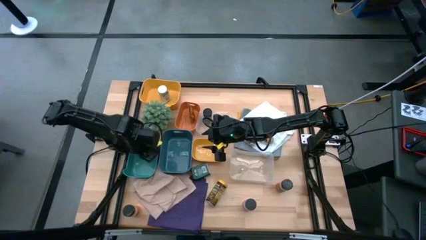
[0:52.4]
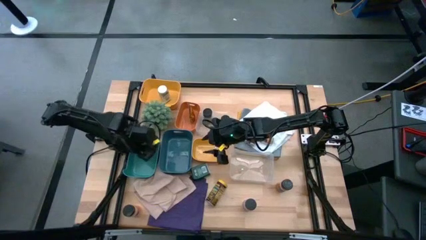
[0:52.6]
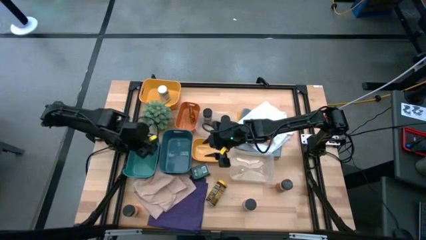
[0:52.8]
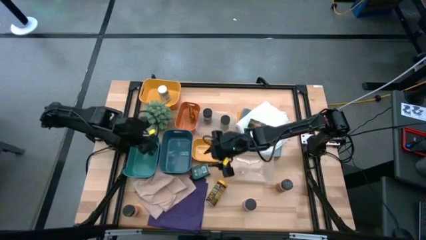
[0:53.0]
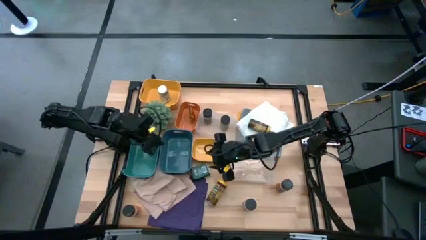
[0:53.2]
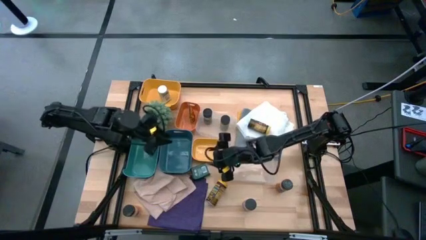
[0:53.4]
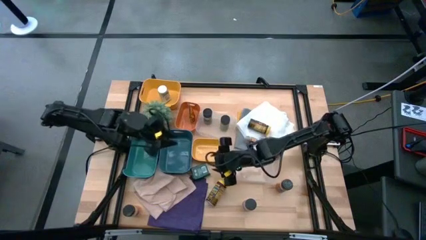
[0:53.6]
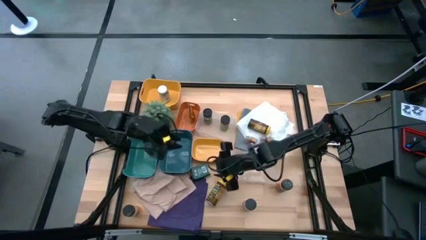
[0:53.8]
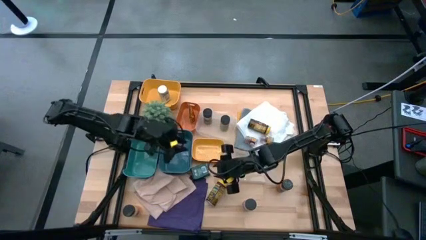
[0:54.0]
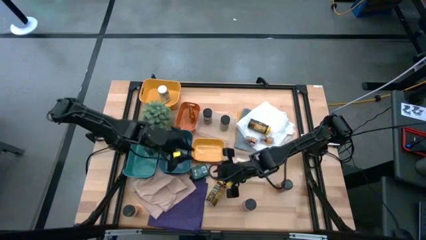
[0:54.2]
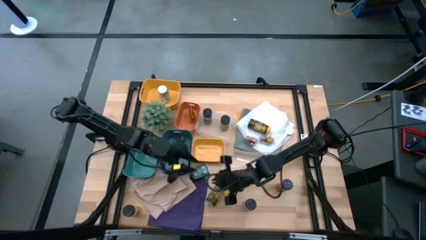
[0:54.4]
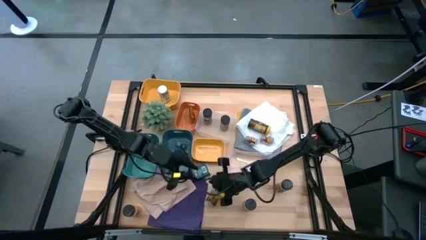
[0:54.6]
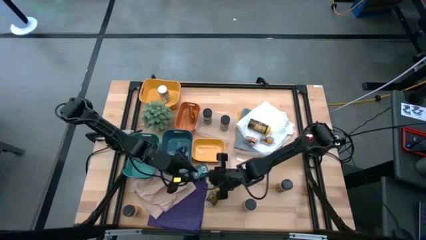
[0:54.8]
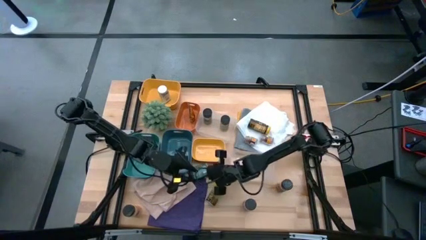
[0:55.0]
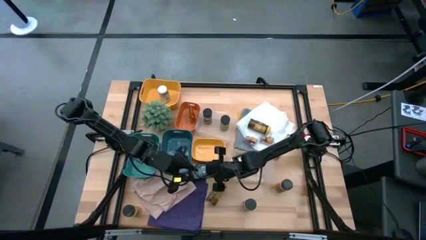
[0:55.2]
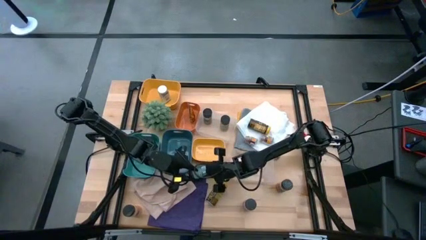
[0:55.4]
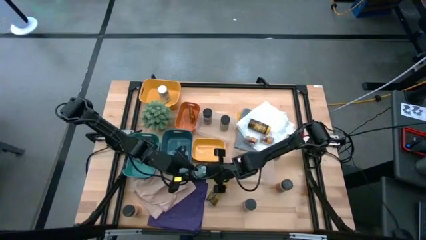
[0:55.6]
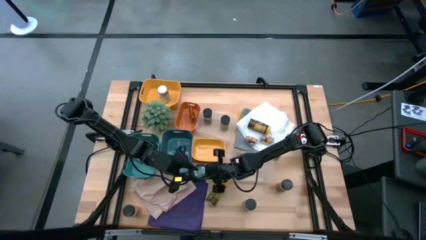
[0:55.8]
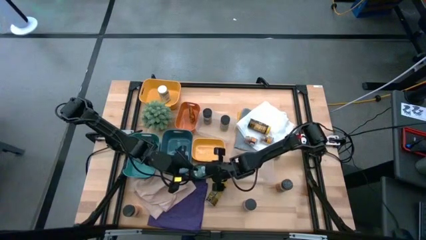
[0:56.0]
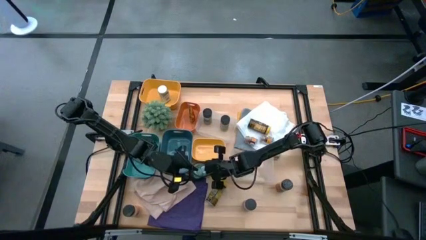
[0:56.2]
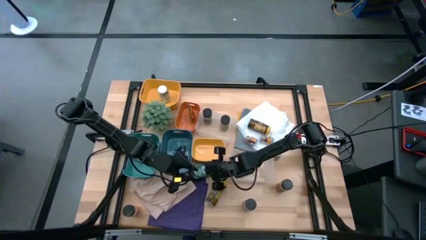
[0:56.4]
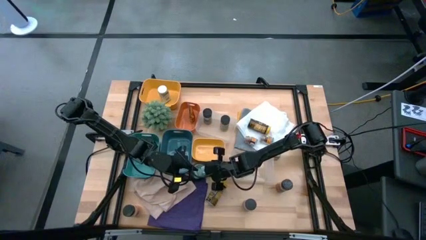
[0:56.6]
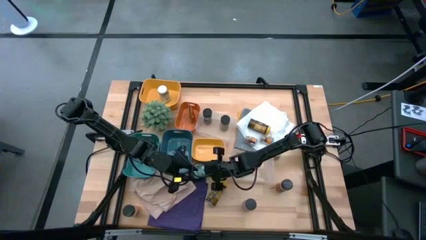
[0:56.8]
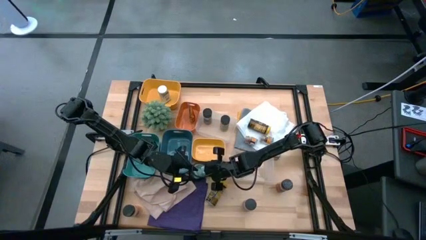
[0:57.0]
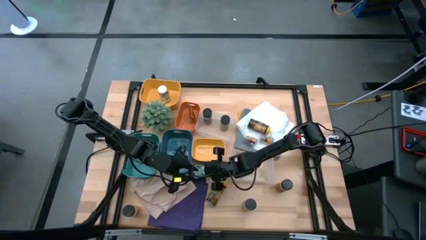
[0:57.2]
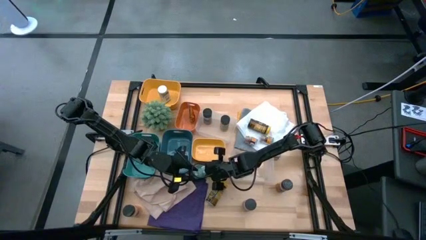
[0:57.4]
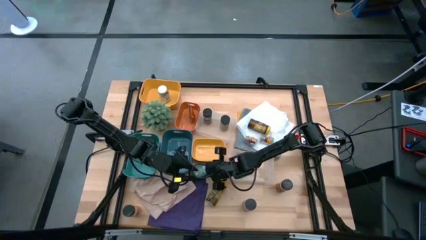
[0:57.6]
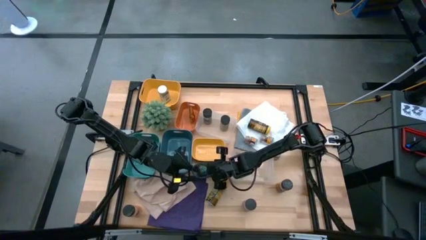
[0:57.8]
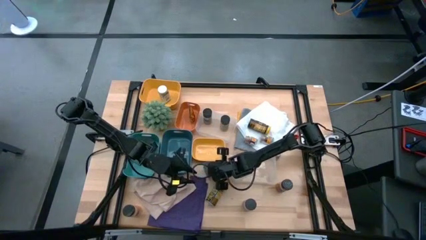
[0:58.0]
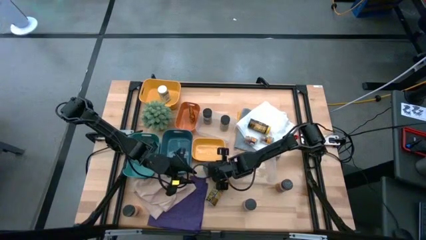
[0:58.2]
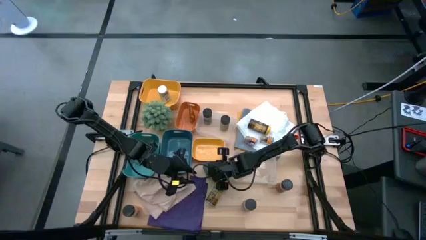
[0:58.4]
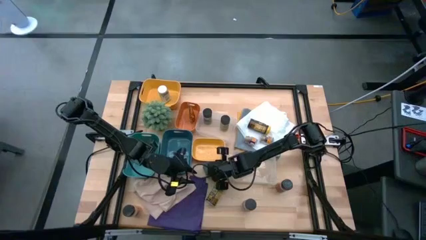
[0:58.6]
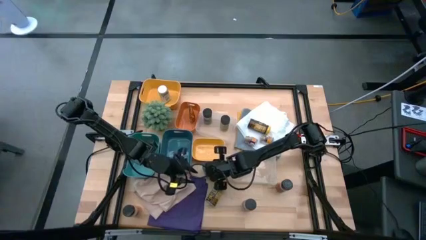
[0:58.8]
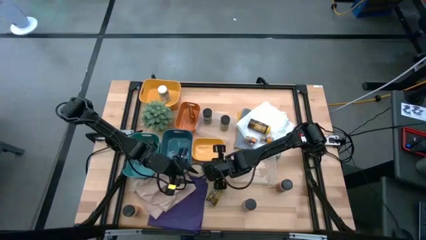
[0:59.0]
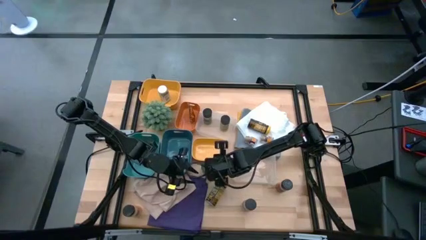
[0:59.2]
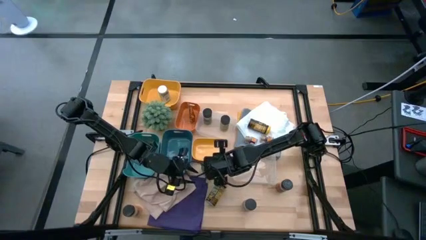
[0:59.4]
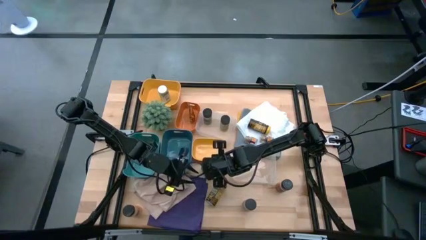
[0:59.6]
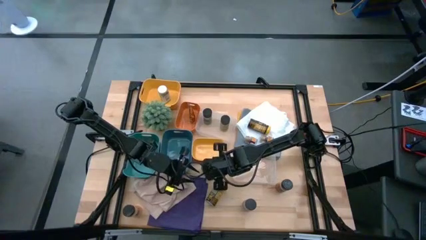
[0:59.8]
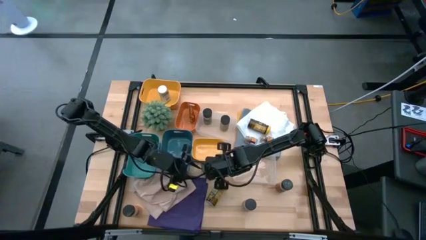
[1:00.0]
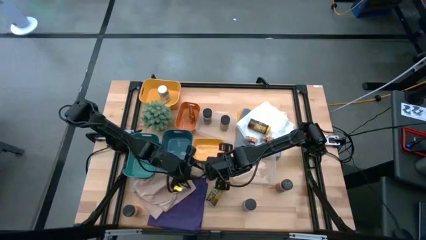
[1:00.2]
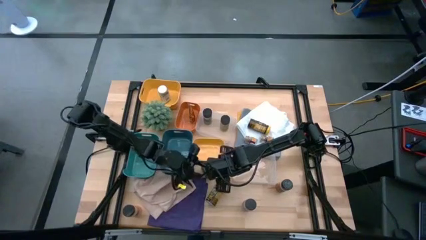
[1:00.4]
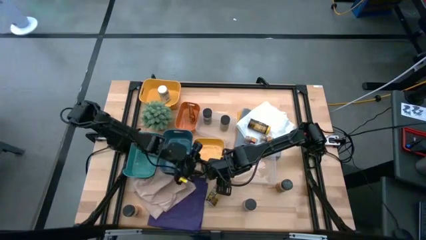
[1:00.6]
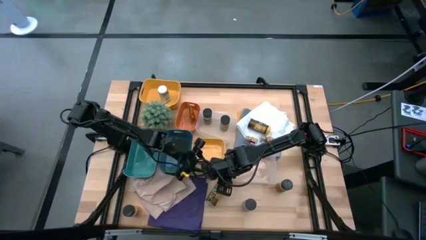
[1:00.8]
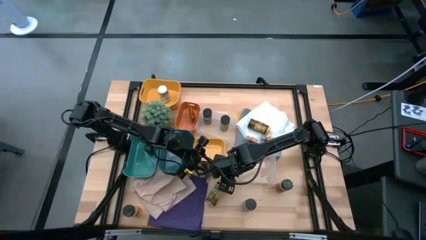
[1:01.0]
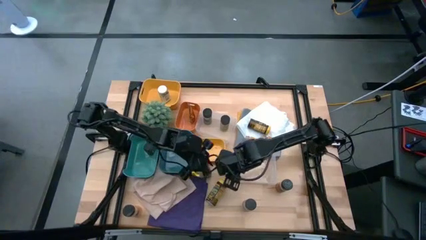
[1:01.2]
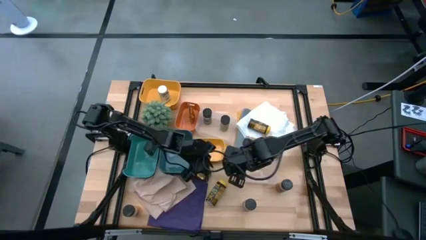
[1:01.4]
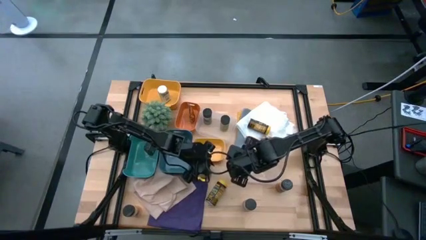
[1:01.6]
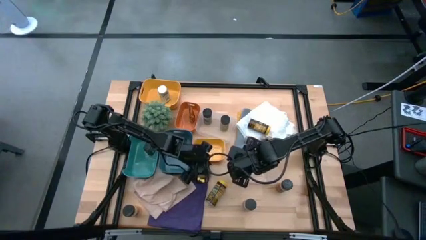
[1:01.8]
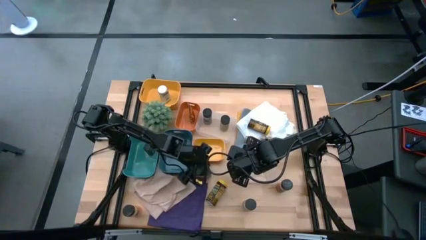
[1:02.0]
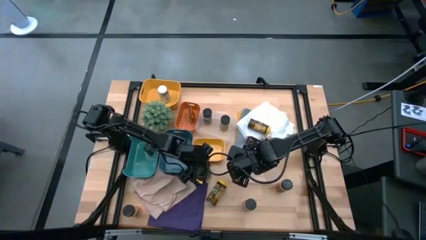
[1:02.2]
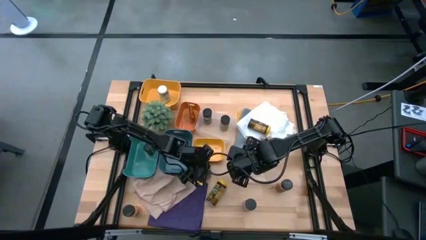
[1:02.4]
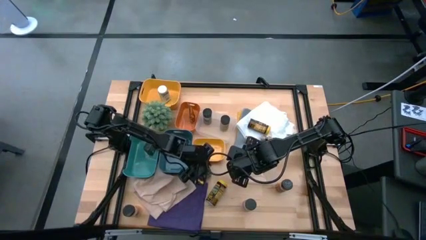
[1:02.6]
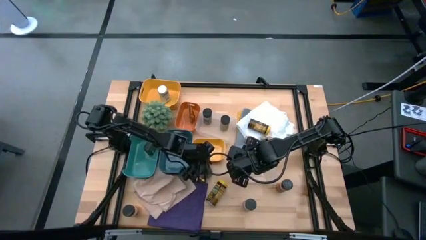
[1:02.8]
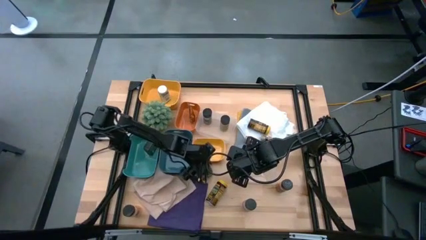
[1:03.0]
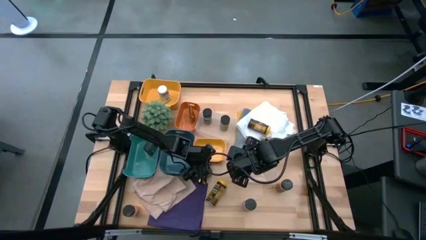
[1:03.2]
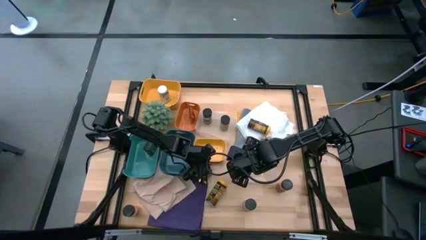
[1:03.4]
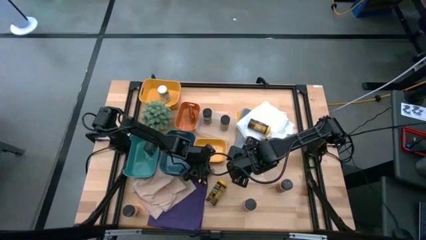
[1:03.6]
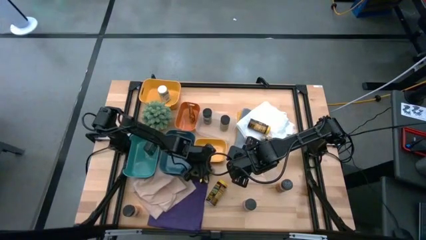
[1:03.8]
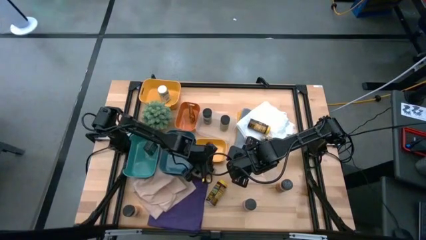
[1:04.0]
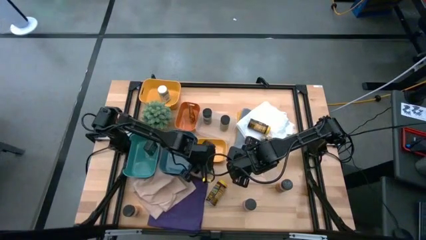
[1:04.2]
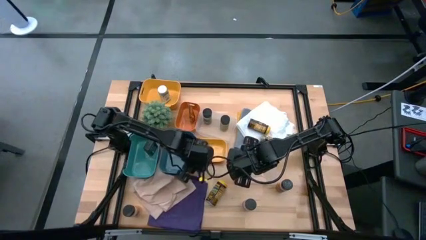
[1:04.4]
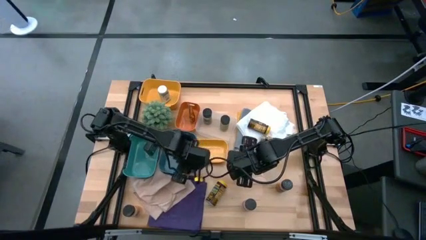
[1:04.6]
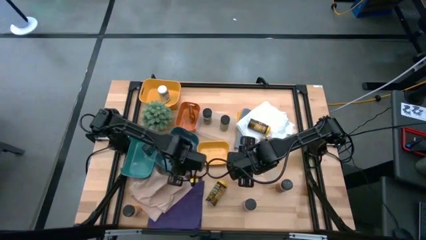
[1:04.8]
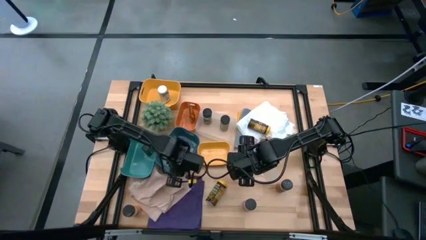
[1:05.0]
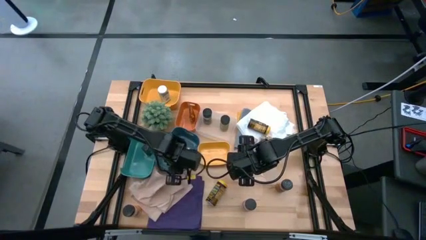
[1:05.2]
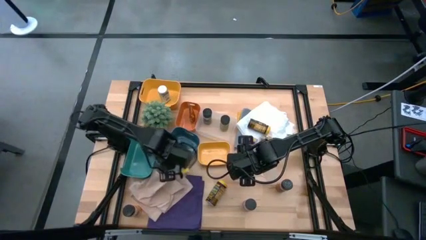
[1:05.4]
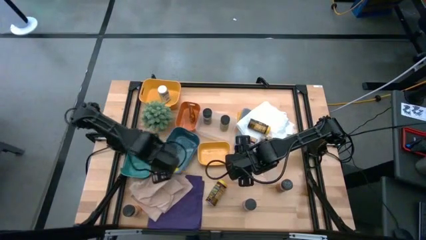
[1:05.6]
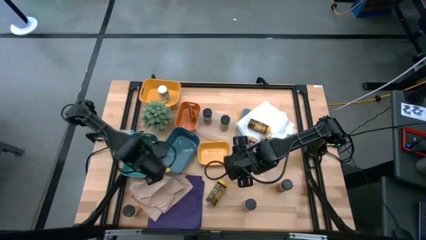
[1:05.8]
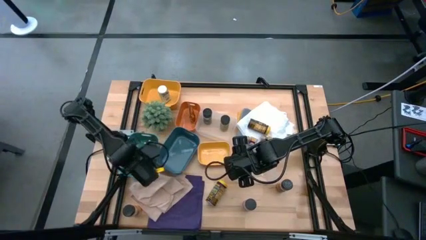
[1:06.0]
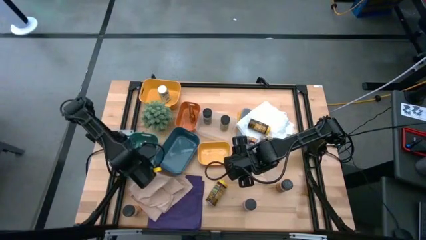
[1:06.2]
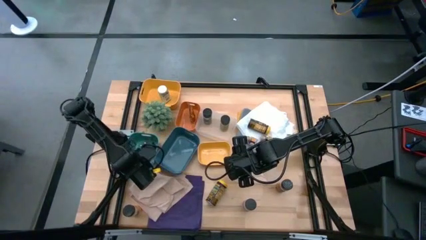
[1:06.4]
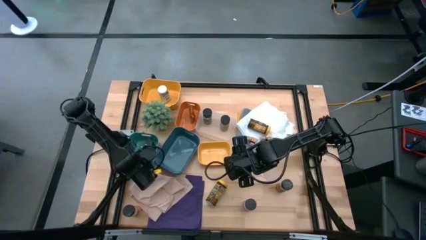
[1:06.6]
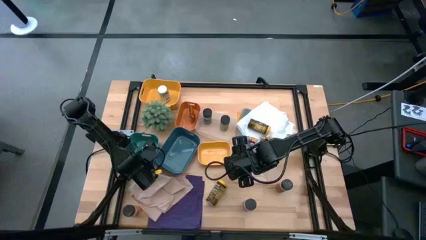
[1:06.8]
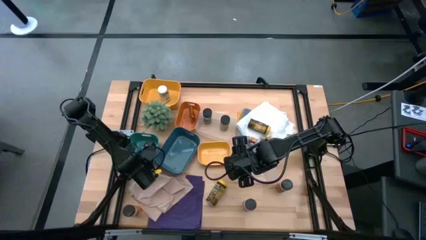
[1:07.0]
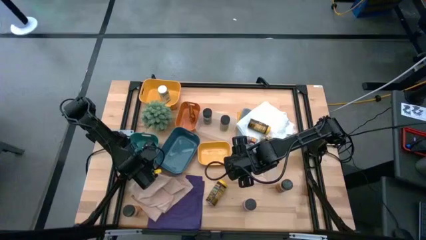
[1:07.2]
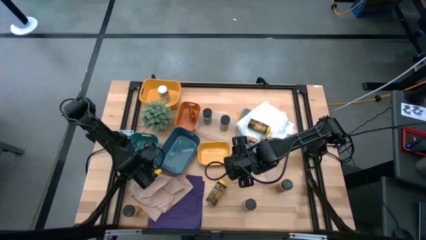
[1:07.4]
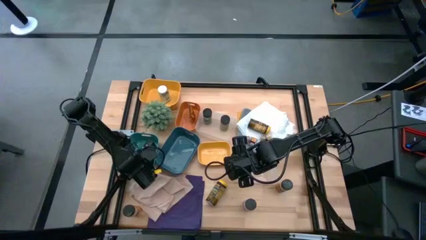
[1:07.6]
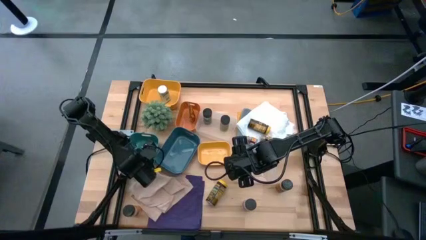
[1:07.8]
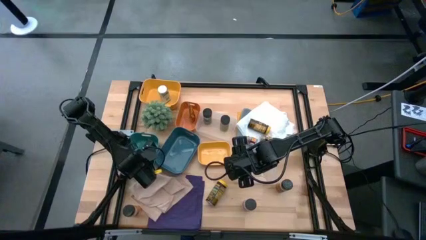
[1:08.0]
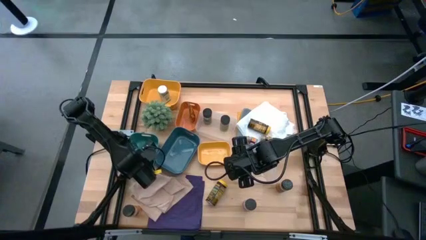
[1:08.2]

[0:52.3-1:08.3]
Task: Sort spices by type
Put the green seasoning can into the green bin

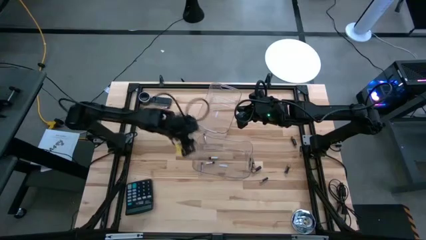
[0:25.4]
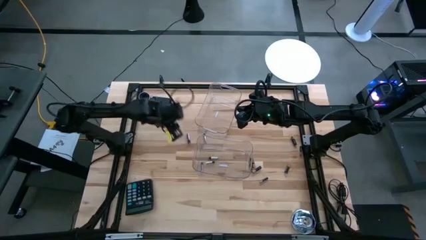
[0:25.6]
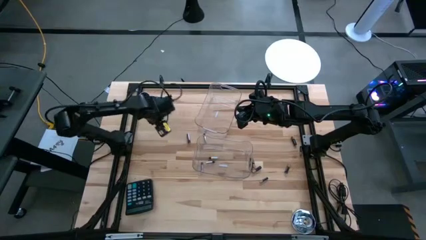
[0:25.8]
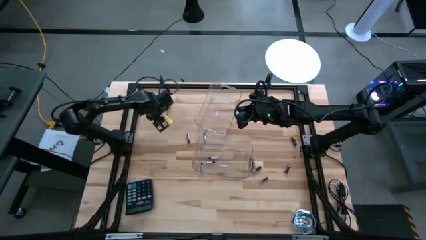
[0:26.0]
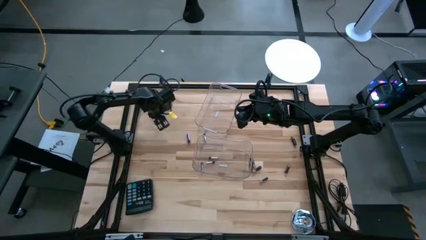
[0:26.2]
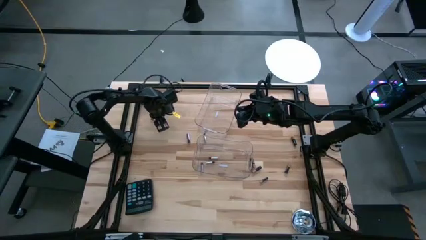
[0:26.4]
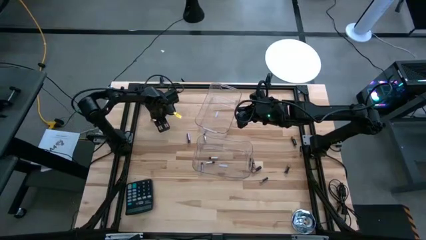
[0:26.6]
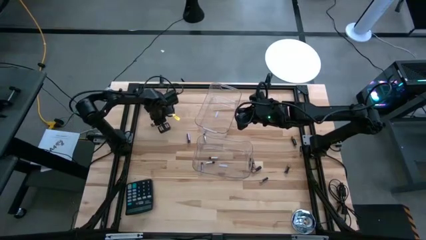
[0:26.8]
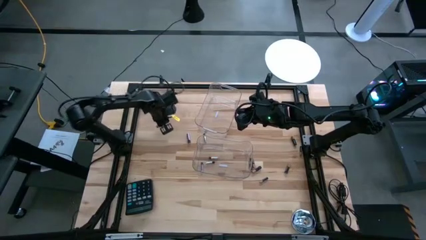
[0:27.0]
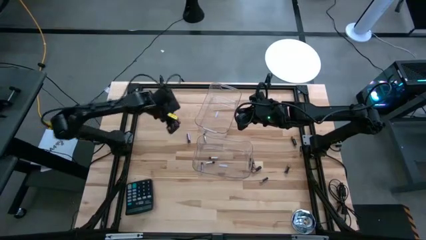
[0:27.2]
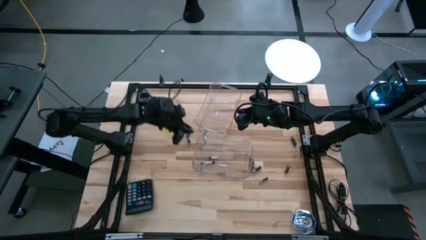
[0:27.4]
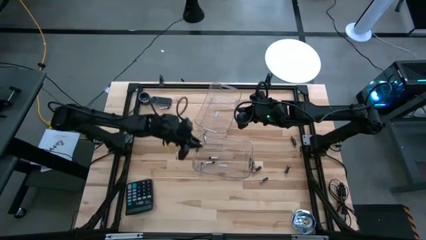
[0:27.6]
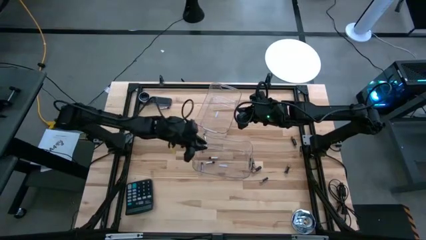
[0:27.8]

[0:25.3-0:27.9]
Task: Sort batteries
Put the silver battery into the bottom transparent bin
